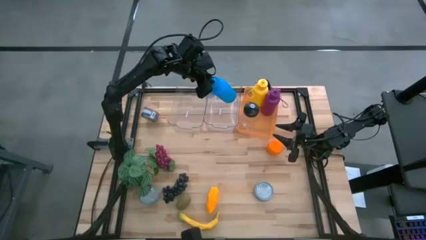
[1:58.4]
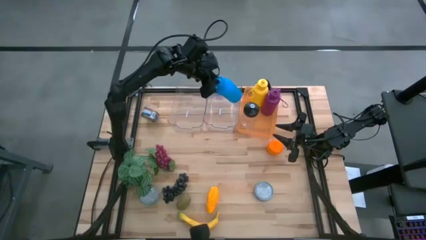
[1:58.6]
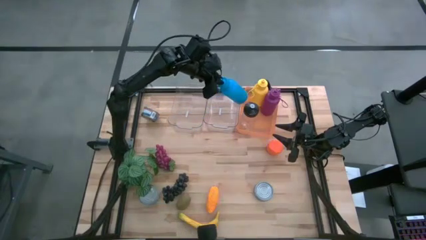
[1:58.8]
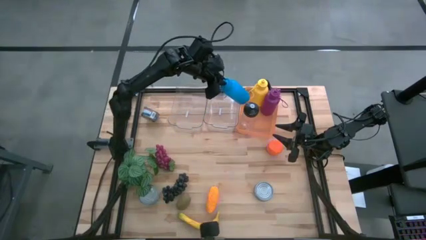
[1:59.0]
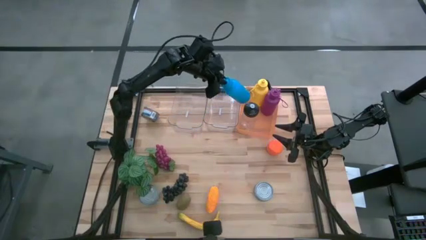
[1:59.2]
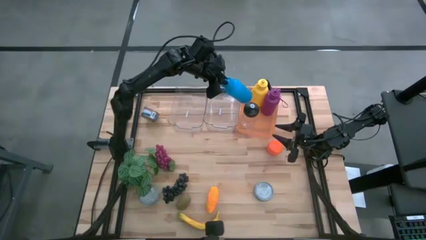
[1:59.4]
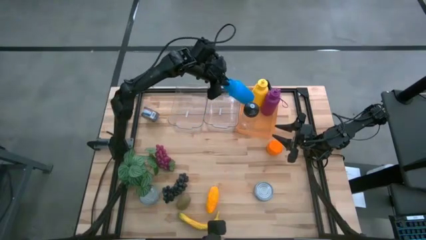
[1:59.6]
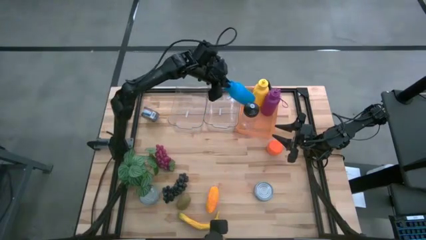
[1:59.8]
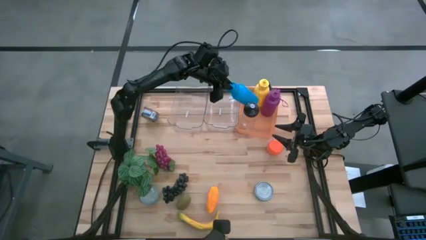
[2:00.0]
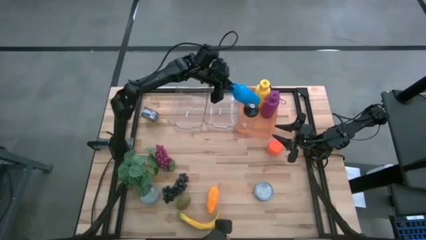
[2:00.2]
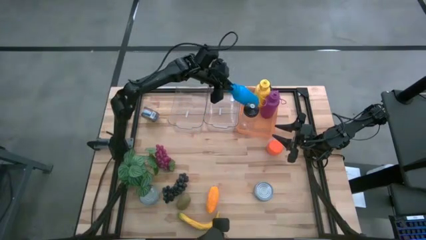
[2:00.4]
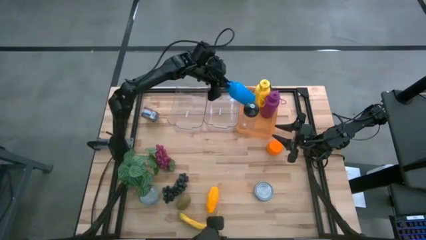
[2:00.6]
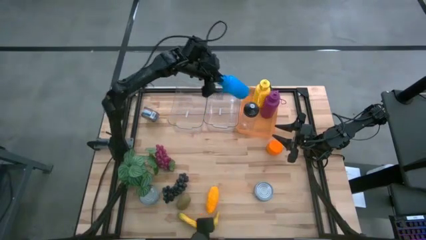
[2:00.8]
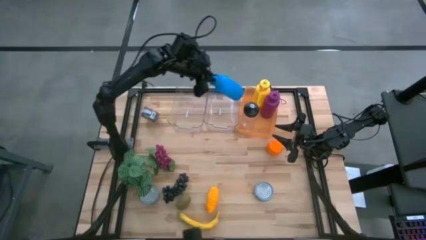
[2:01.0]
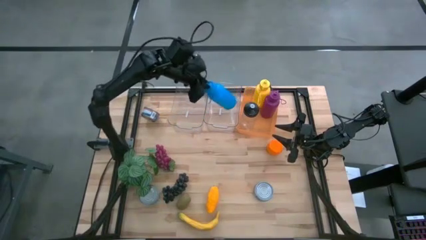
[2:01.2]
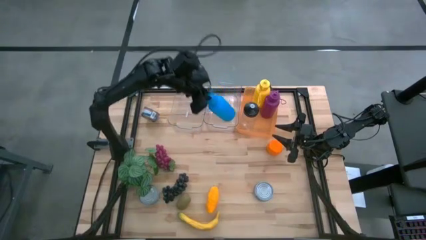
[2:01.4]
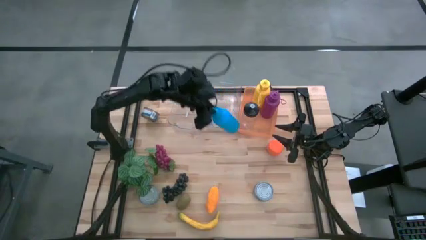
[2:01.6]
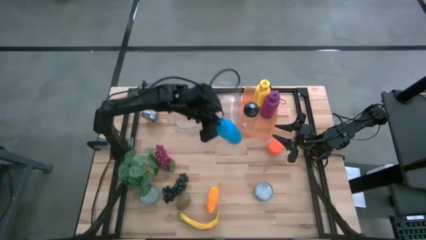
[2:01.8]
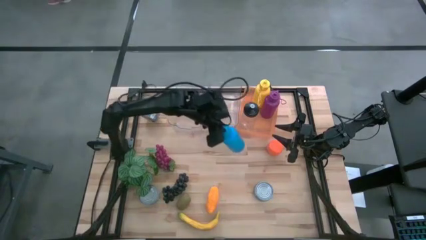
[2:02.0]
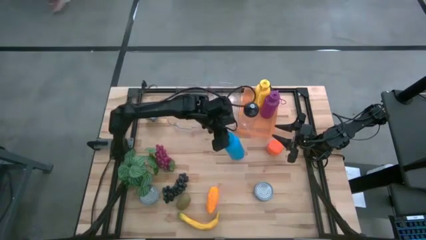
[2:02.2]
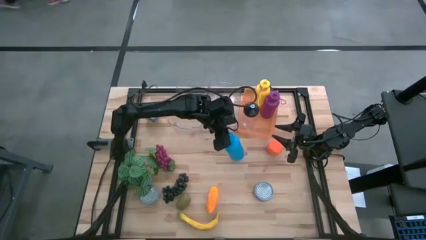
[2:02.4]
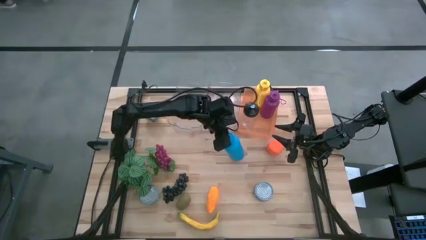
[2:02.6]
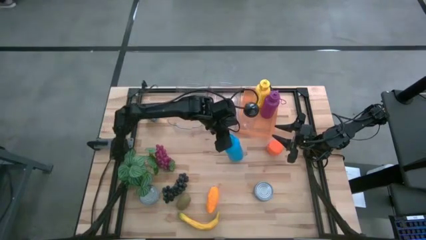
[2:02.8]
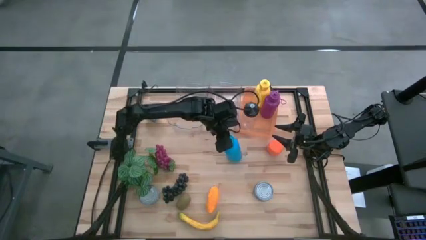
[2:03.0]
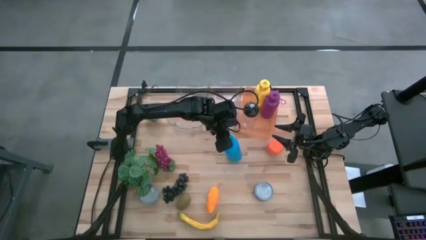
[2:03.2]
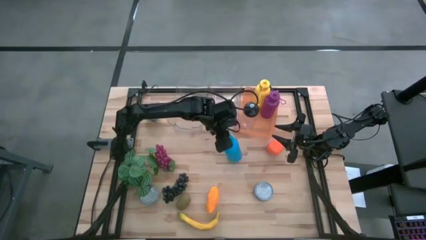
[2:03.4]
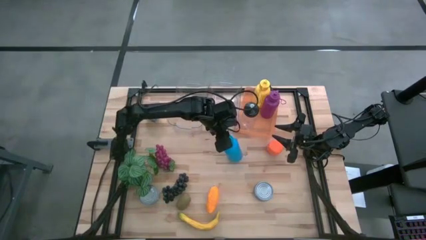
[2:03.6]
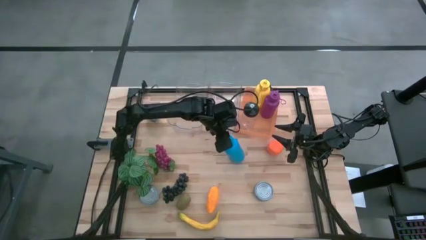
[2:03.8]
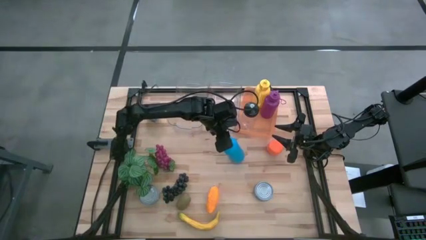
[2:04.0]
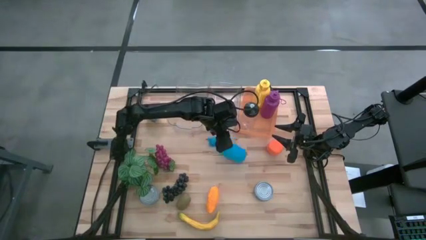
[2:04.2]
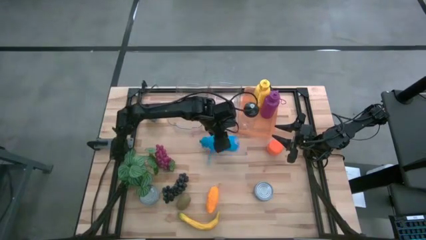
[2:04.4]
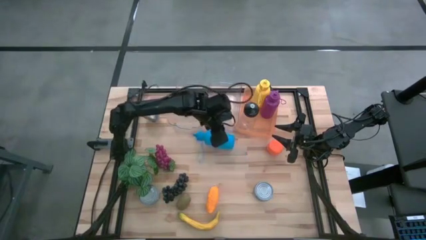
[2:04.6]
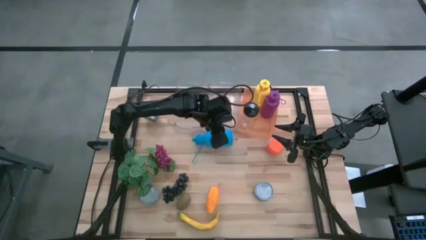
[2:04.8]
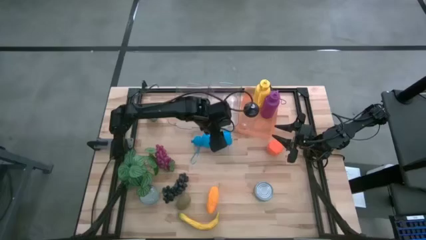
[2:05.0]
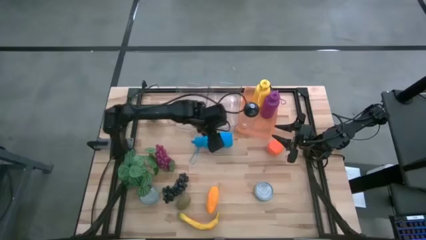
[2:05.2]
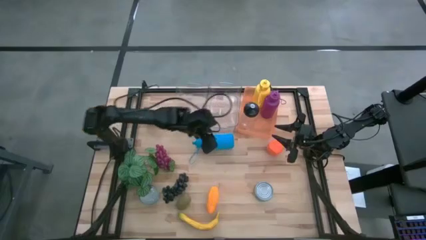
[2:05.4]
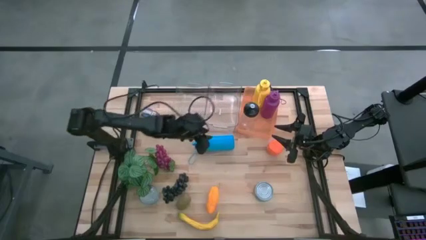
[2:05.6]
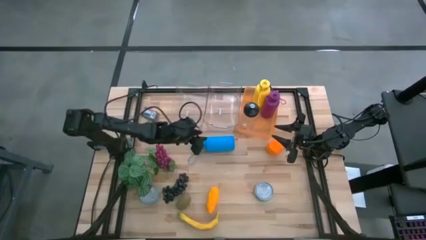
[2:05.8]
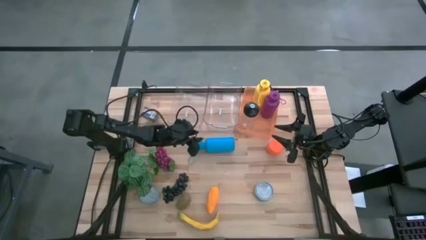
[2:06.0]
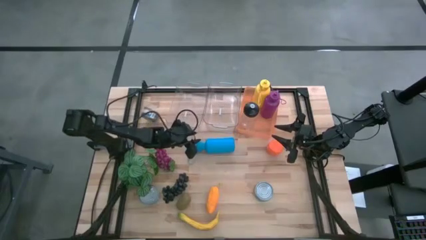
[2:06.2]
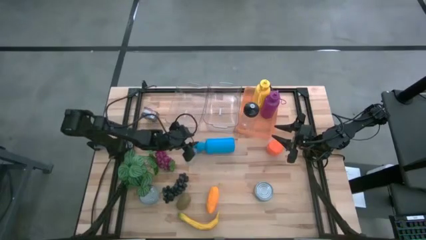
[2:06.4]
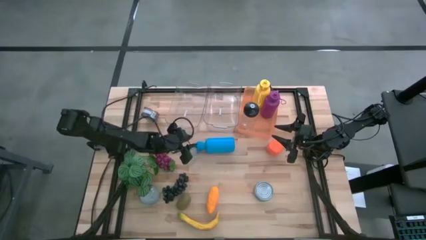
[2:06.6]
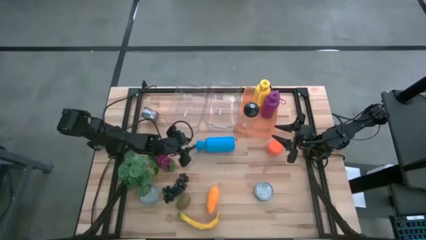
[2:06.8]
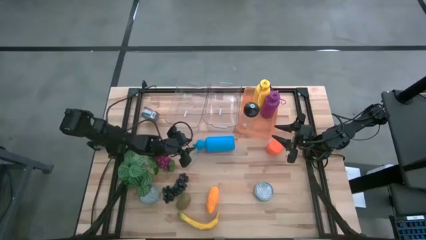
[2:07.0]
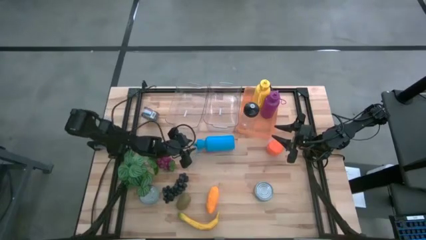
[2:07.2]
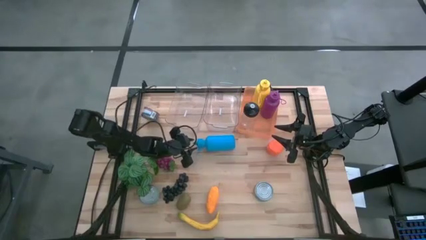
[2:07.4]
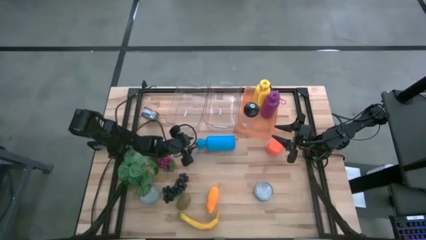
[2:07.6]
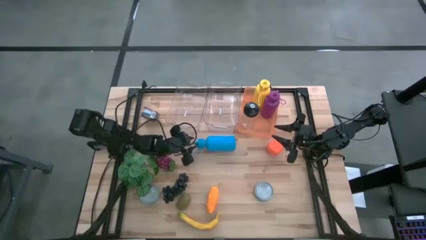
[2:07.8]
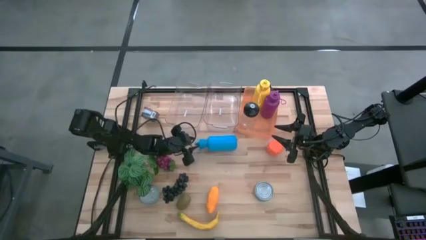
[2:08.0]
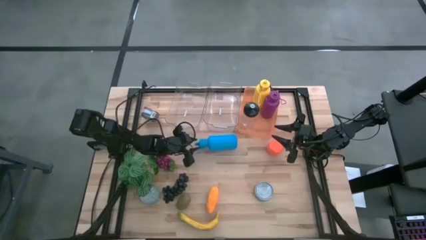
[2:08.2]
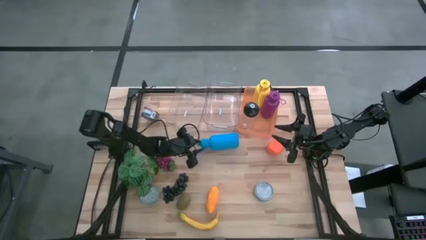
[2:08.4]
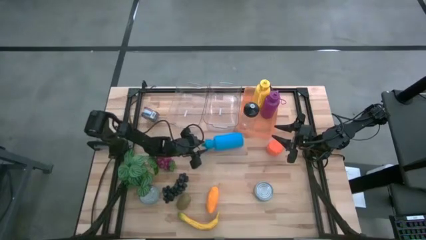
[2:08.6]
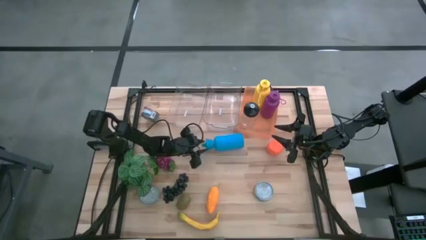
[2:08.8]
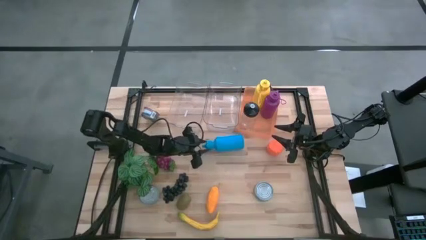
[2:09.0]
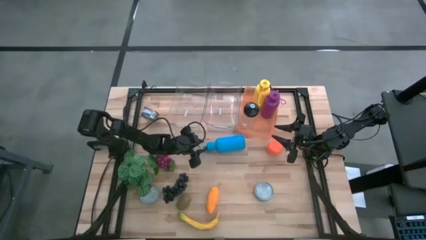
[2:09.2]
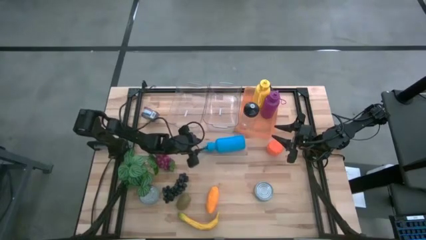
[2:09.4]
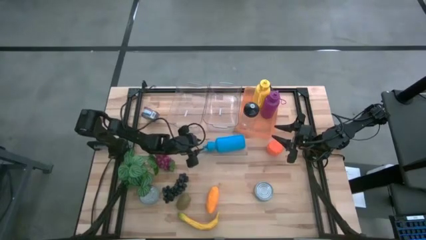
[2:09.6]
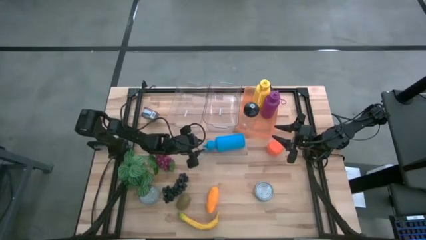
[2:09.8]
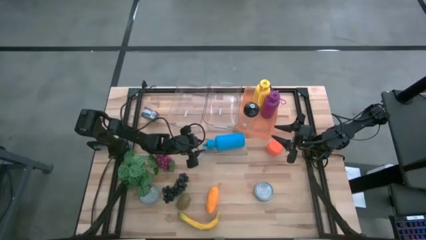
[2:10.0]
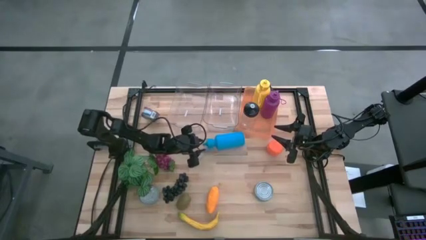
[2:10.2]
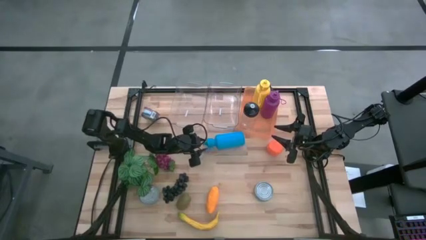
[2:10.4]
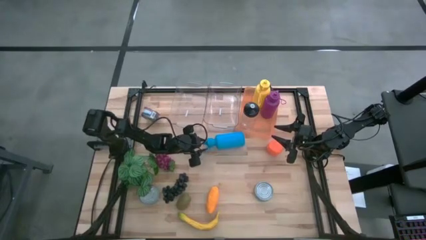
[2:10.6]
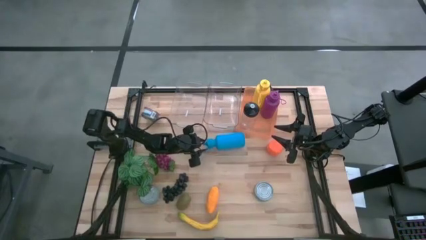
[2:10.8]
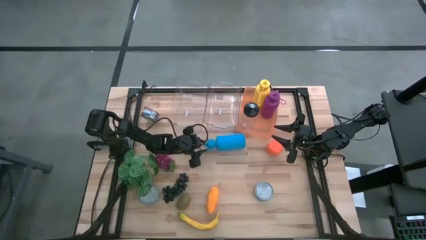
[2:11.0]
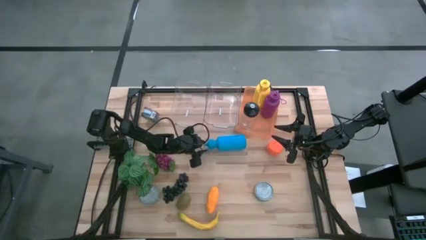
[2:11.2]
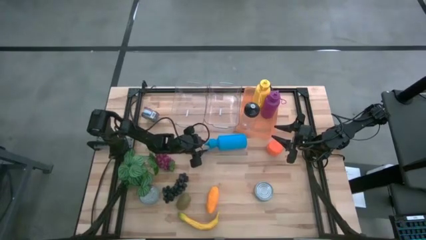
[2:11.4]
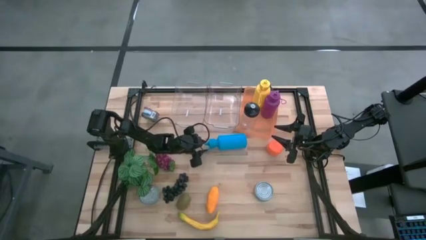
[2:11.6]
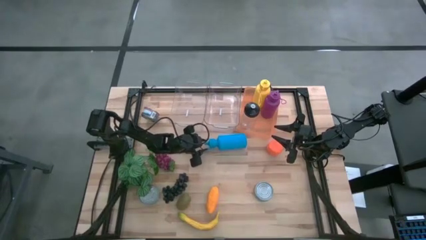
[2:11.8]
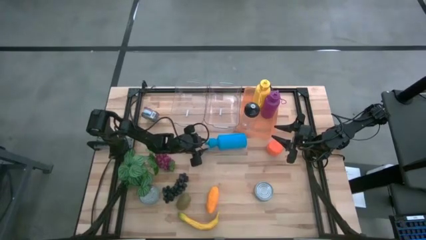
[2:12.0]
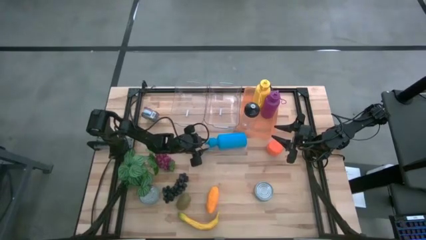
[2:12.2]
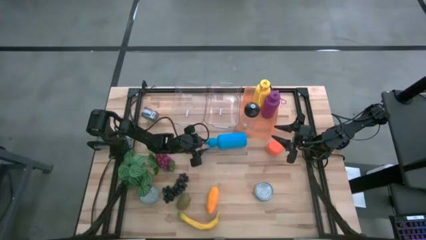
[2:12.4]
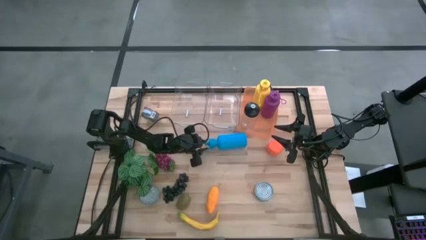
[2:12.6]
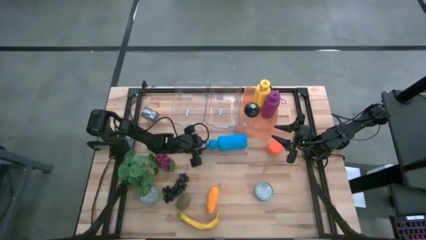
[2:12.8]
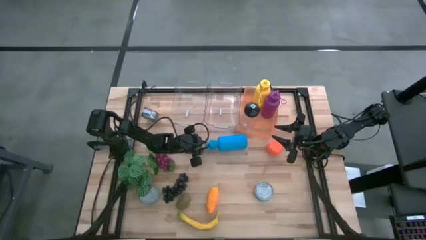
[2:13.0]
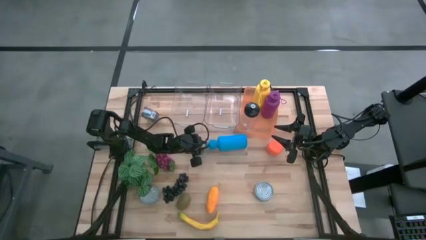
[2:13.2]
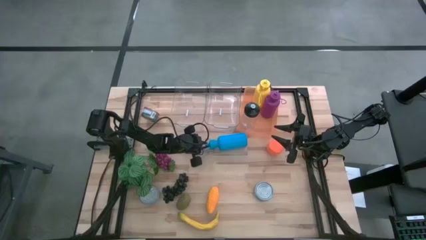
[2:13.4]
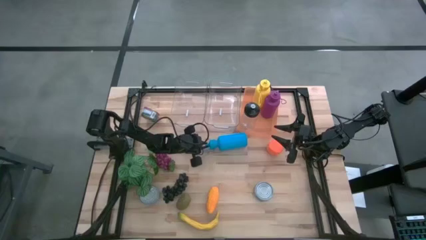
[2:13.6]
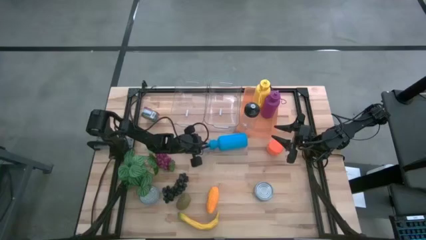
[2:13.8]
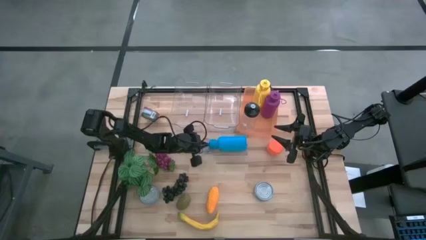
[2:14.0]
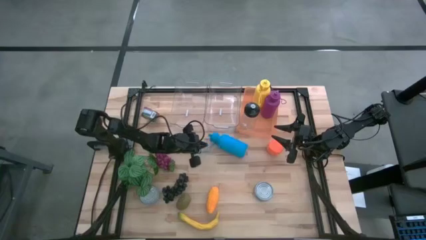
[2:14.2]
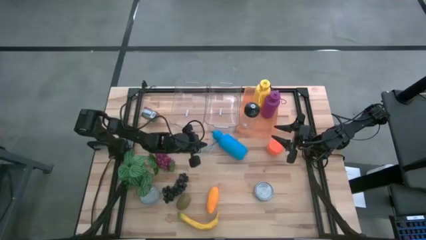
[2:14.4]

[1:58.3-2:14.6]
Task: Pick & Place Food Item
Put the blue water bottle into the orange bin
